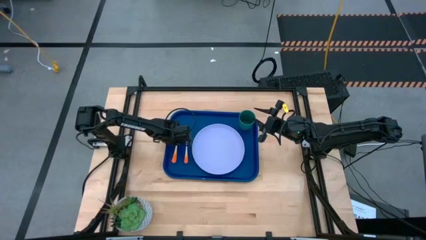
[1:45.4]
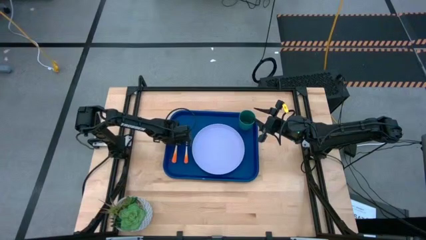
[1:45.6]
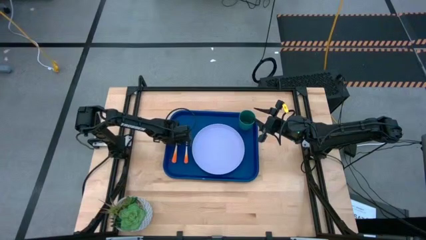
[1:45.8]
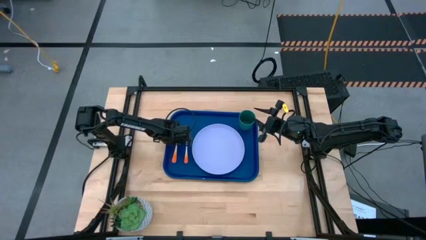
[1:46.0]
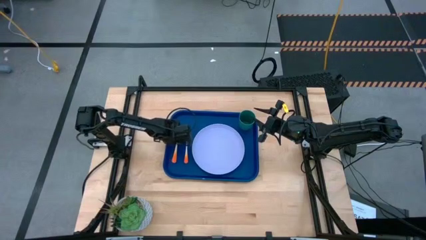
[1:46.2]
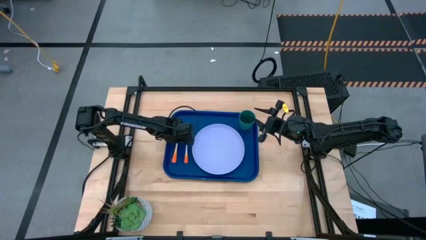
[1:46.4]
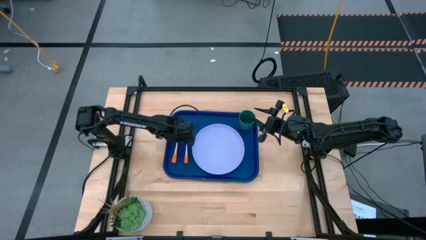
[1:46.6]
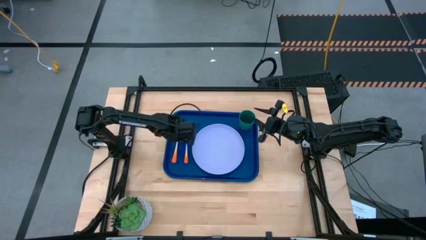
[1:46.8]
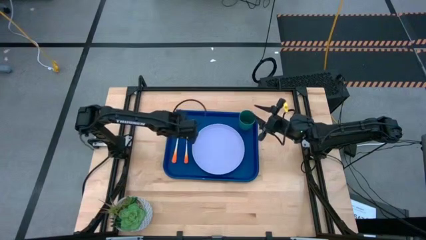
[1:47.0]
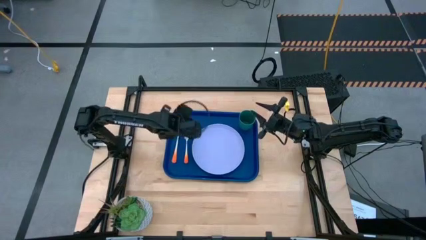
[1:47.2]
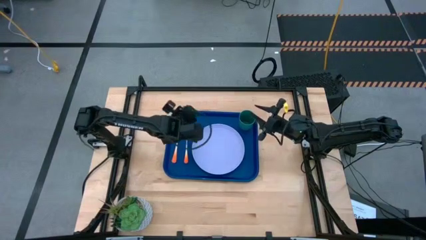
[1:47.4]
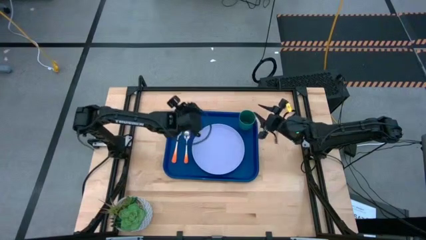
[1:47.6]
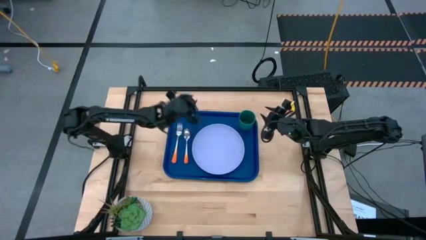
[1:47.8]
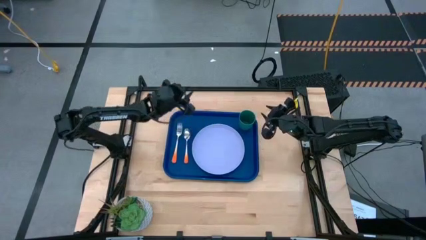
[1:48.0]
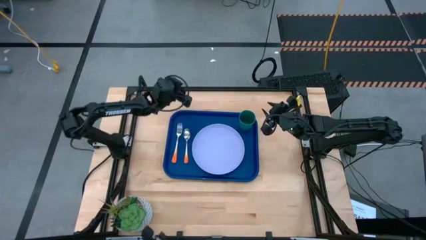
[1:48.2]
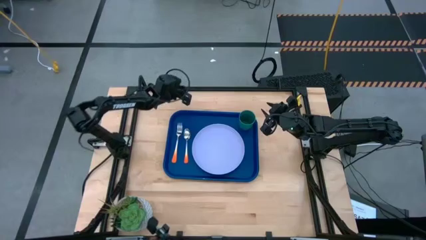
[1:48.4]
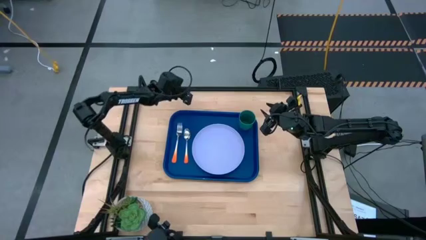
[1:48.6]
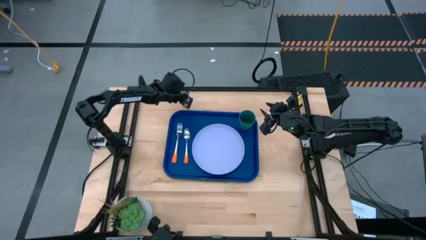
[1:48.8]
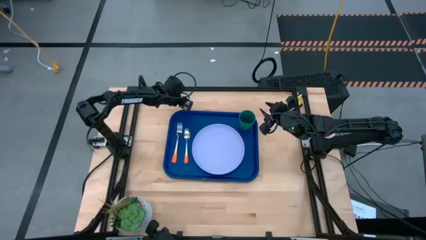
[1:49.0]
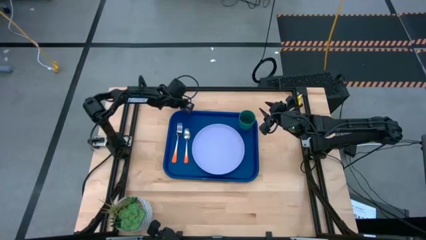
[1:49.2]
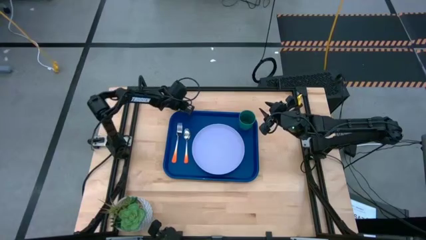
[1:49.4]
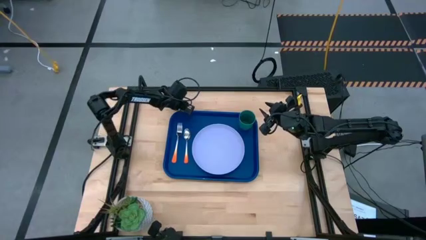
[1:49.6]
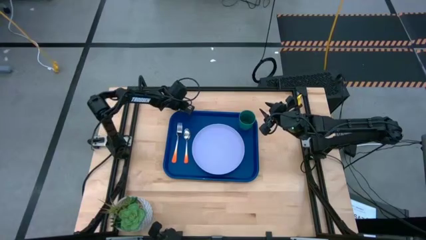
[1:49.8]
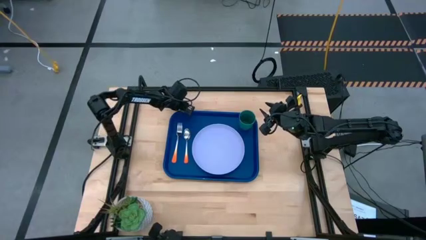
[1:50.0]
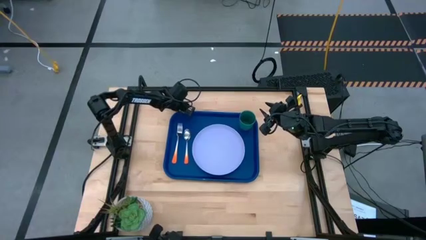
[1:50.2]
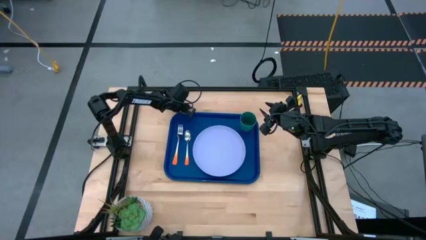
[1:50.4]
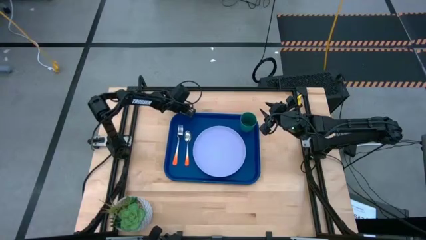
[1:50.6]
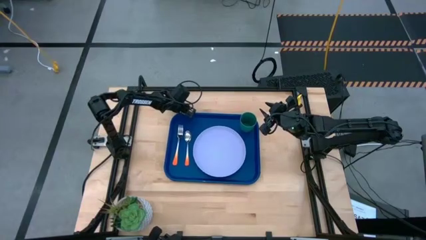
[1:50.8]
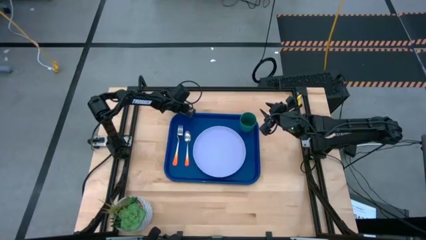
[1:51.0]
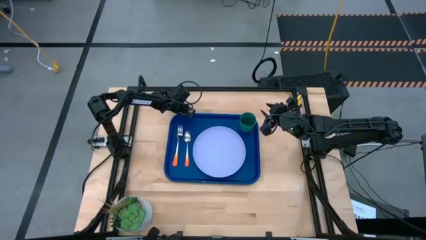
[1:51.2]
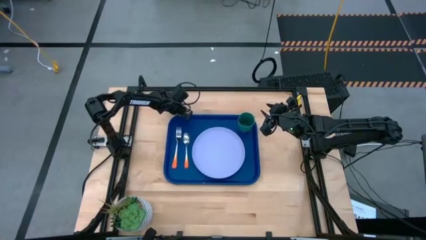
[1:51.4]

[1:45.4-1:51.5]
Task: Pick and place plate/cup/fork/spoon on tray
Adjust the position of serving tray

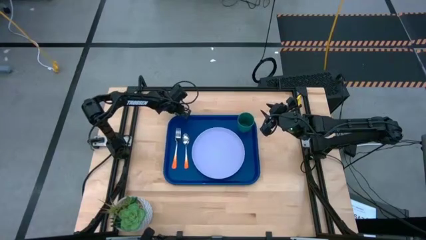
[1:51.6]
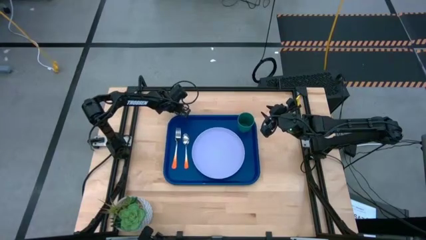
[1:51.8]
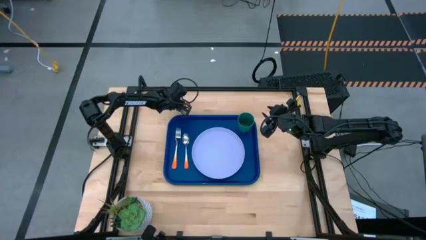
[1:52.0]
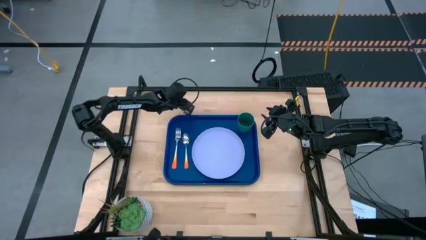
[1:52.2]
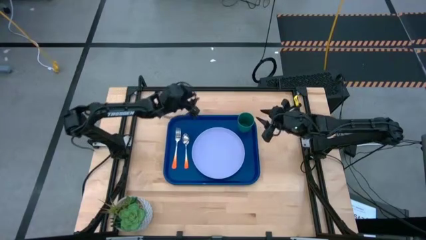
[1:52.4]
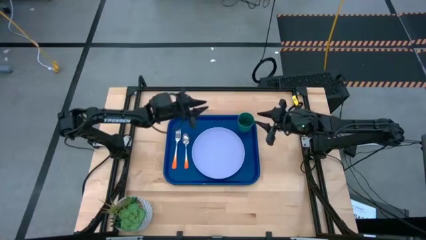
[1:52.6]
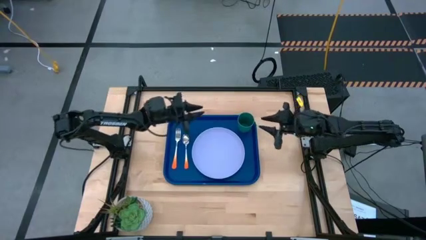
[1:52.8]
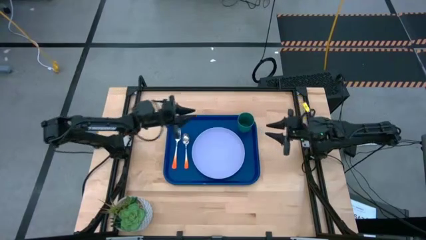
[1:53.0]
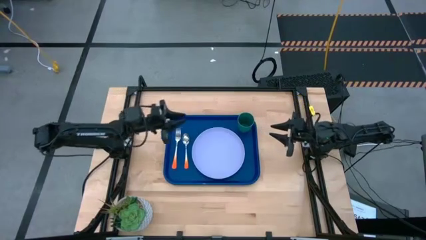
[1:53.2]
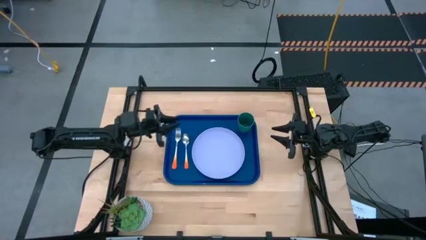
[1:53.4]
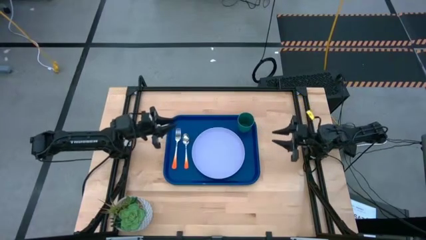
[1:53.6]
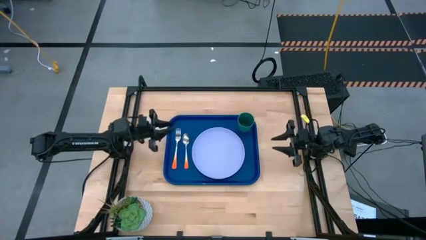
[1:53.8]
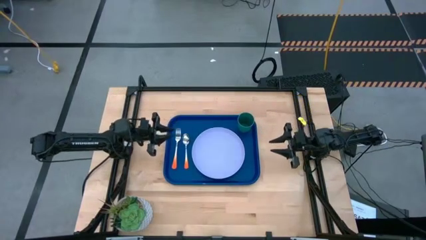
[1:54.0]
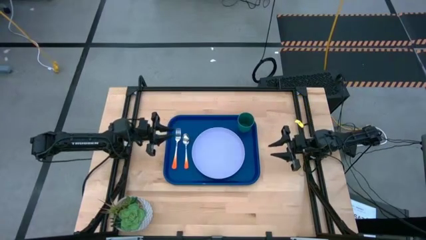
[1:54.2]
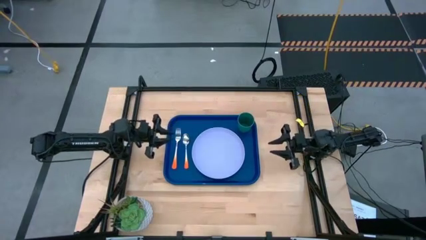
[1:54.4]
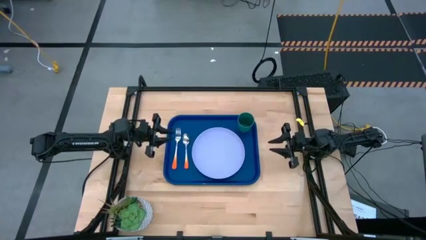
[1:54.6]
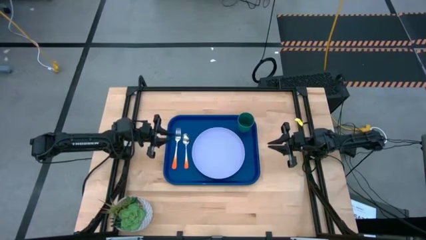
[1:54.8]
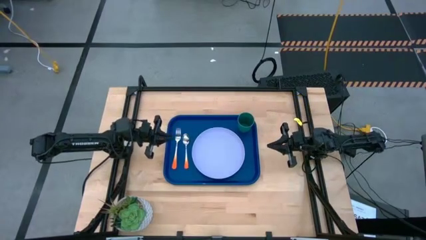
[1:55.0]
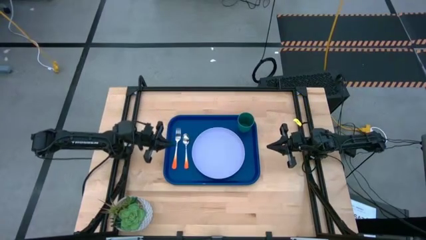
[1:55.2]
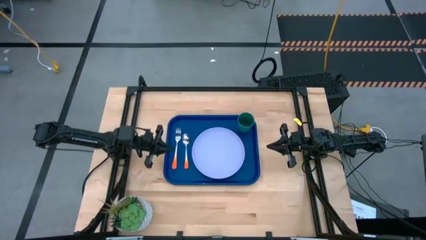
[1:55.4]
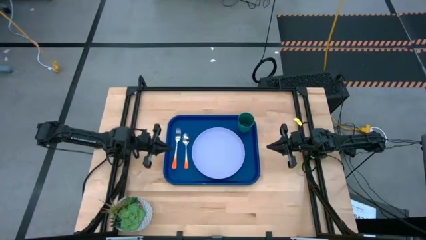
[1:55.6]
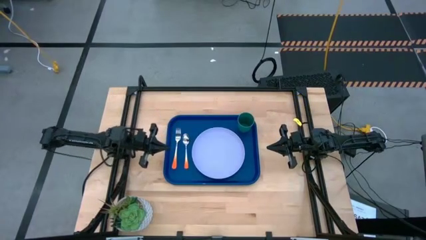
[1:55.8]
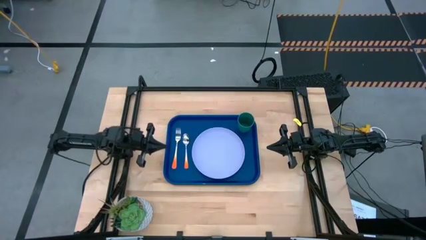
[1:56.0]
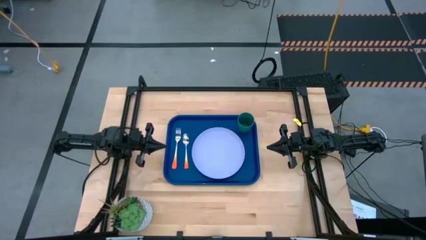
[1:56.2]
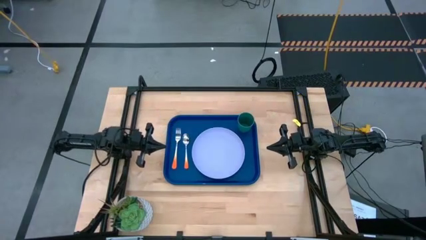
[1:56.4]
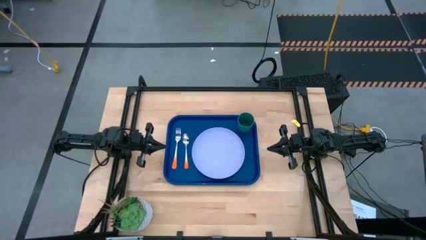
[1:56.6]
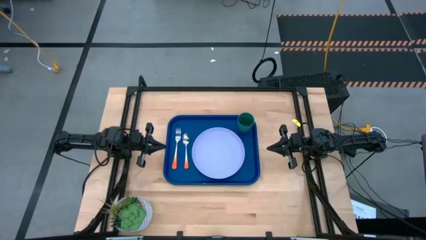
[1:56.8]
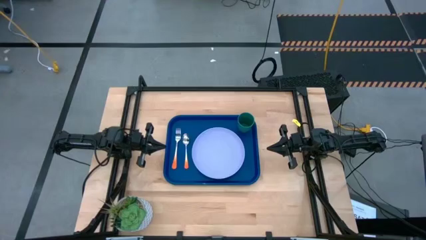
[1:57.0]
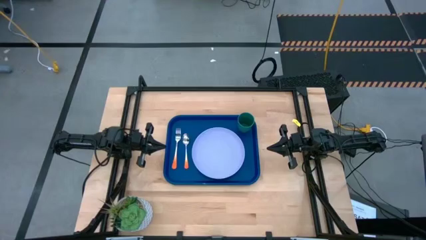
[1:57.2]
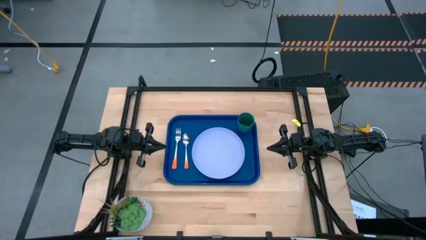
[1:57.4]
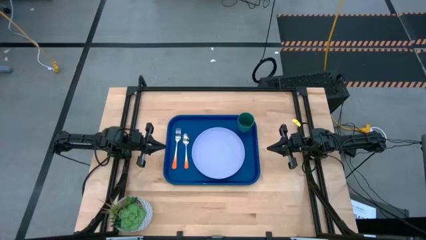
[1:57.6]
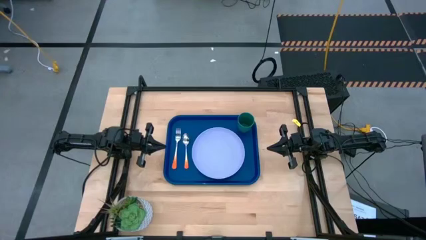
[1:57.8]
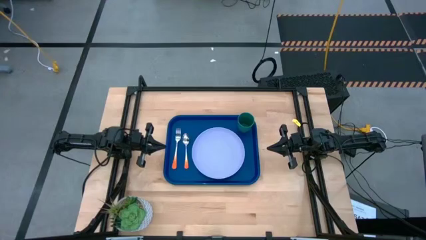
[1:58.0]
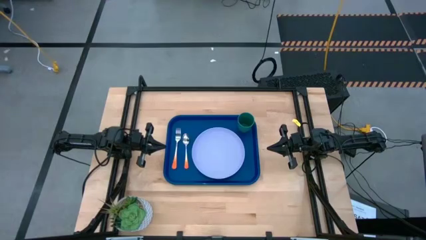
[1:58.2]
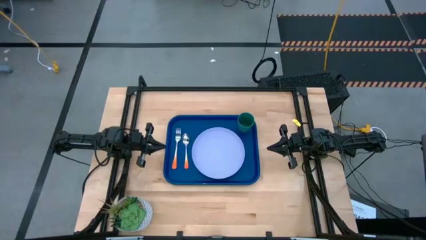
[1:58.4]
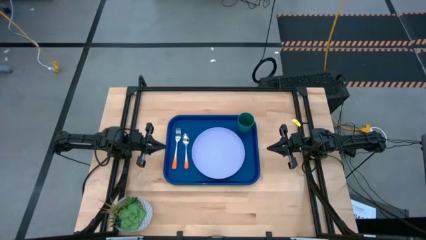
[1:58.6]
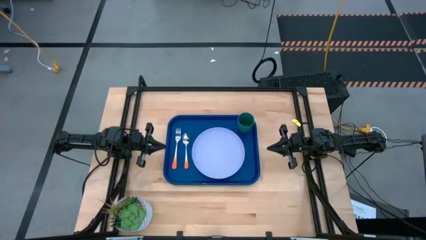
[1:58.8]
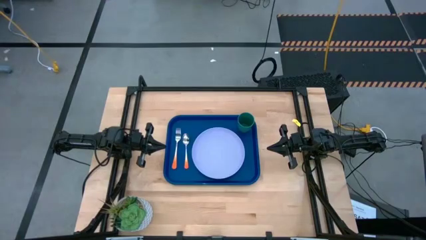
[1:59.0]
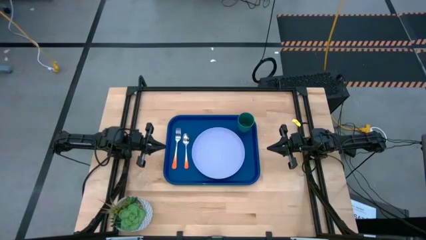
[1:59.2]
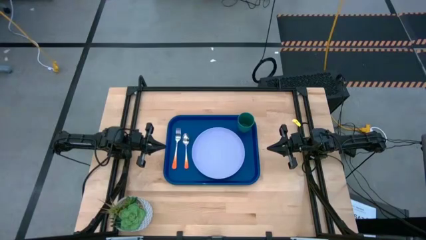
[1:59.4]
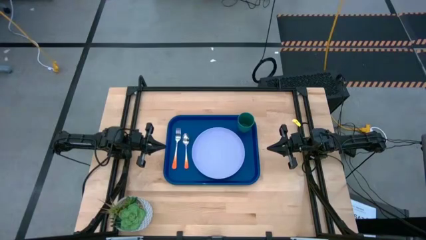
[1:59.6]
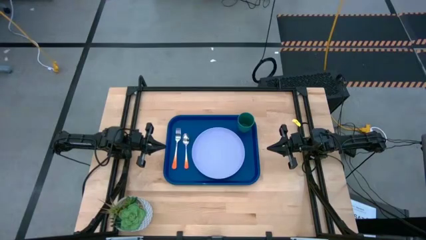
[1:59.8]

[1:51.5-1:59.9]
Return to Home Position

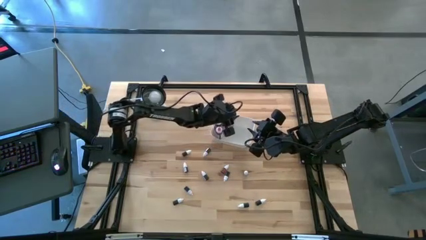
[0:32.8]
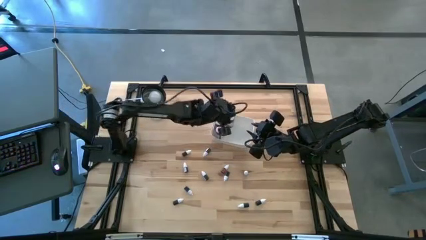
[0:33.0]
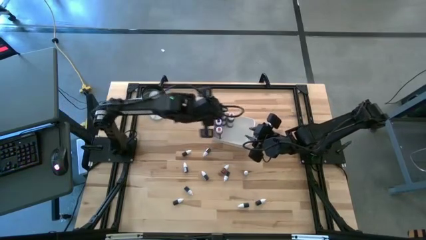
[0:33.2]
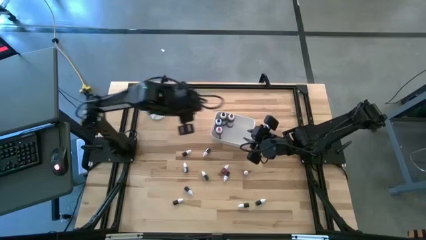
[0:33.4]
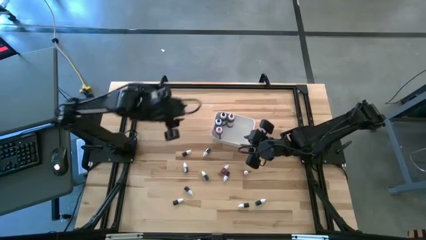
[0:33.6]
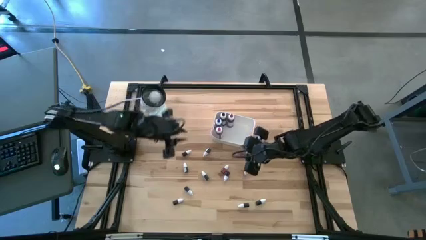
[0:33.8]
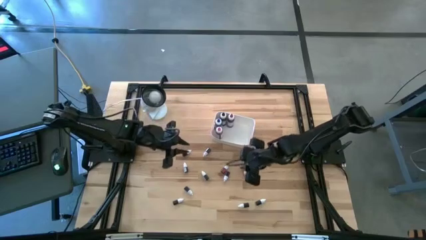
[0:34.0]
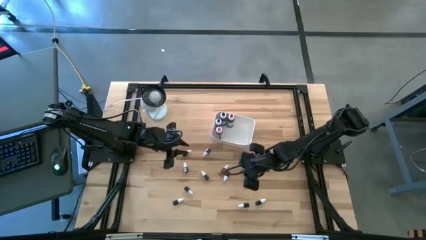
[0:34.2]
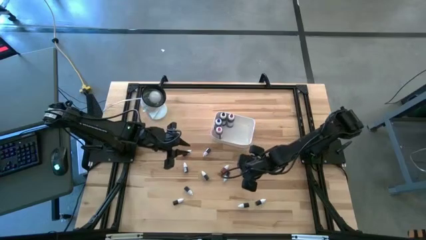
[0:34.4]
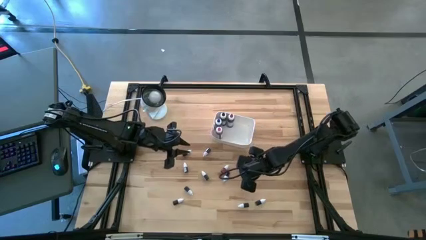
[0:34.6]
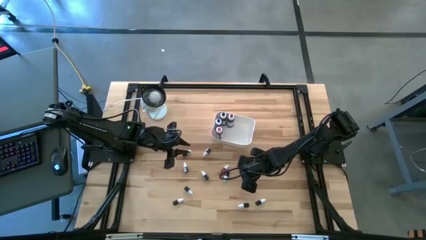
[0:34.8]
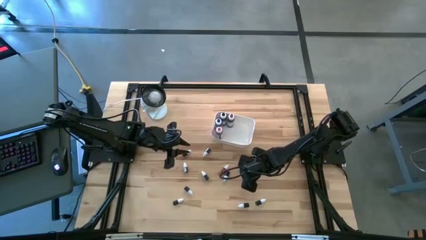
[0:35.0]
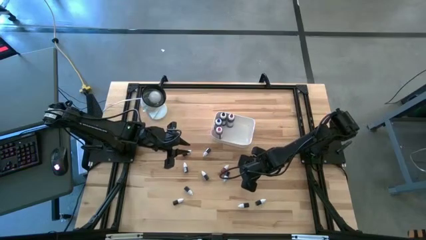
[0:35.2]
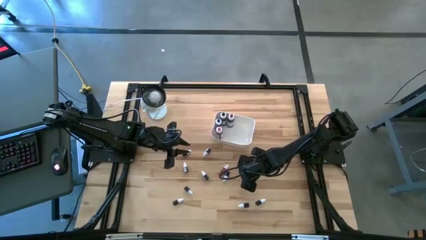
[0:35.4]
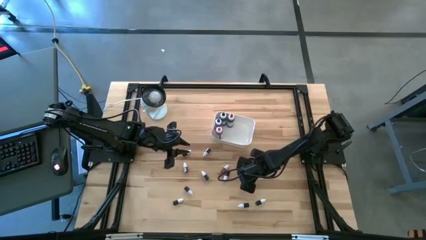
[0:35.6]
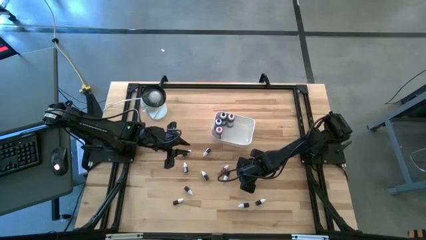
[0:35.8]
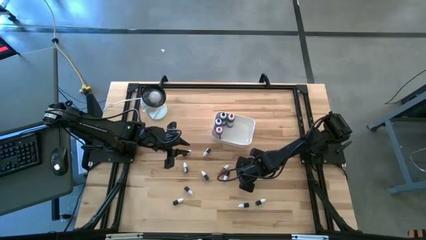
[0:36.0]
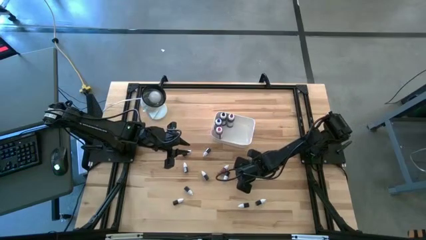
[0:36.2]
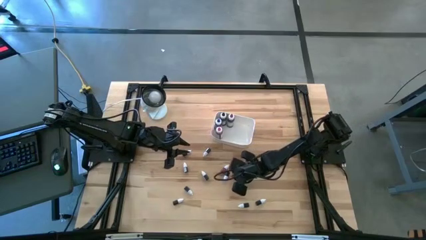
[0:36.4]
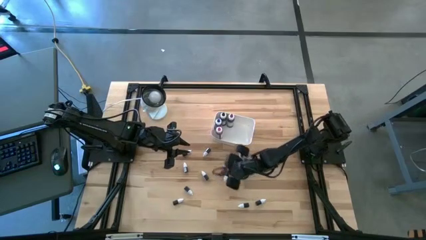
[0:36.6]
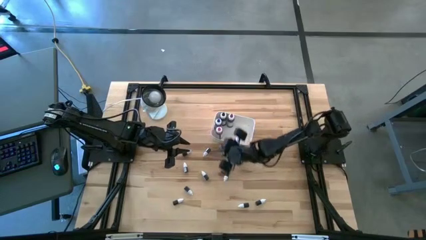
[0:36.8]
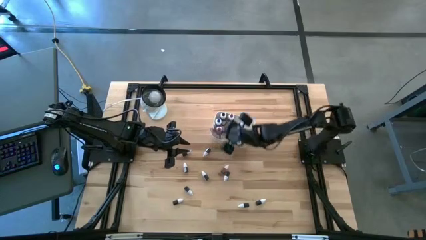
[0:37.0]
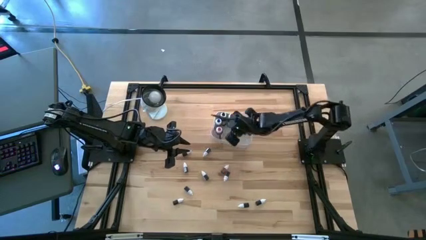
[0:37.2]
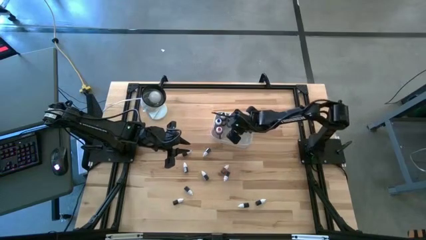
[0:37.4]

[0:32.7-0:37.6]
Task: Pick & Place food coloring
Put the brown small food coloring bottle into the white bin
